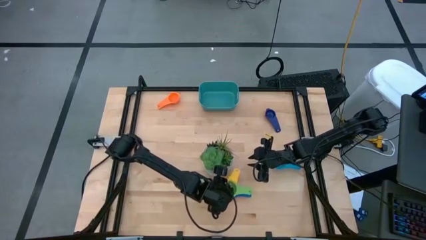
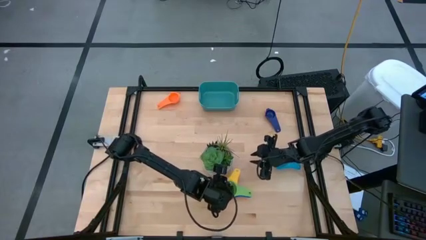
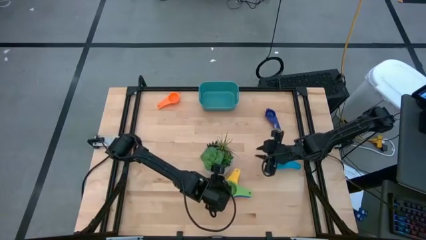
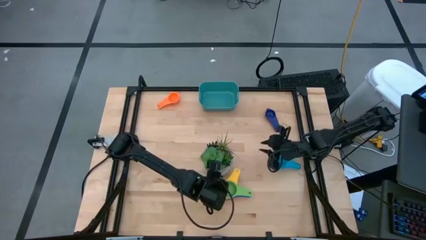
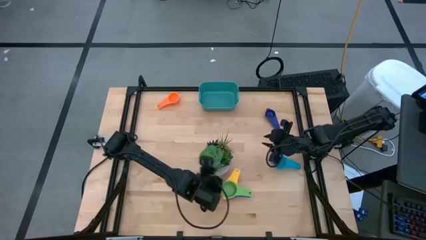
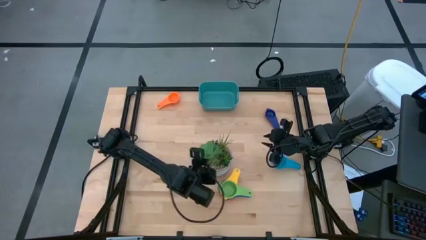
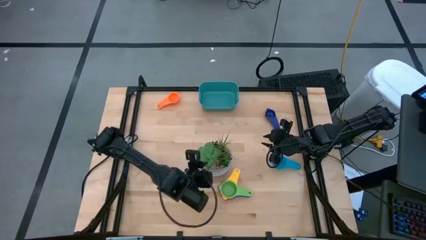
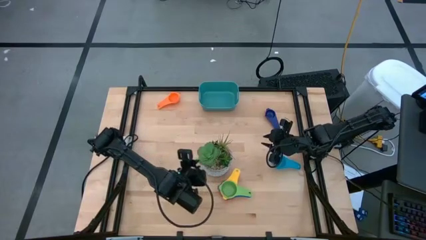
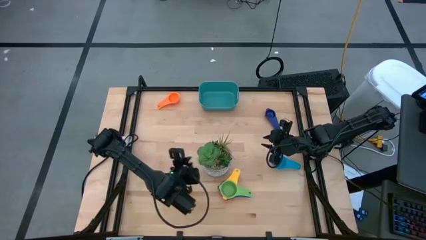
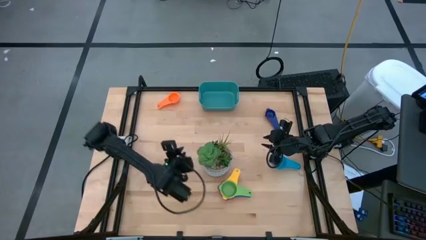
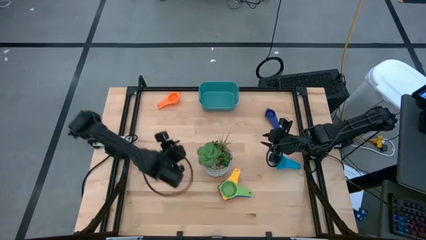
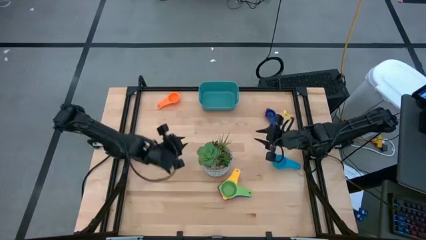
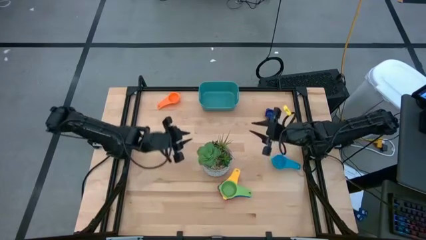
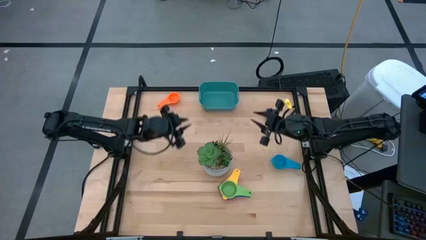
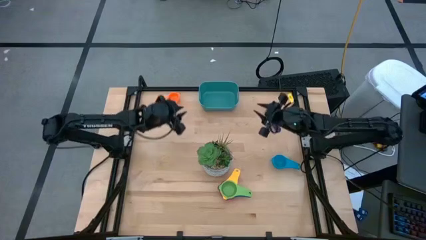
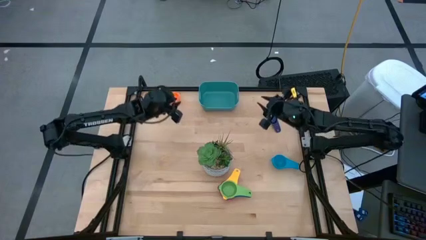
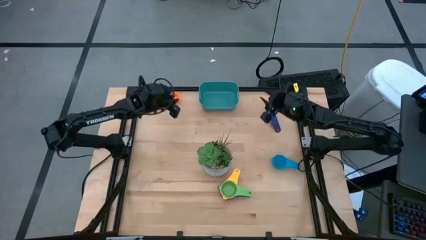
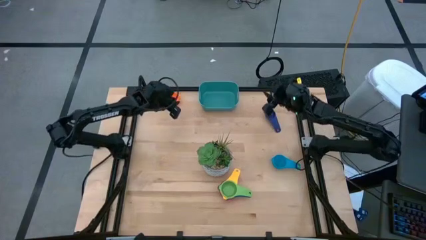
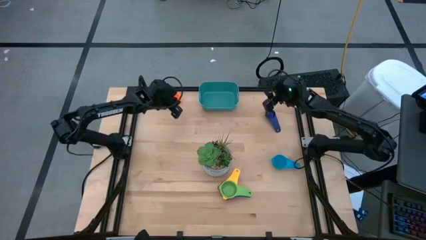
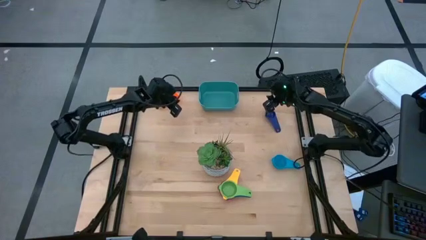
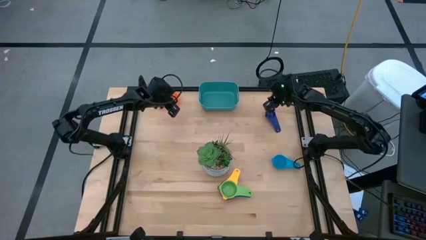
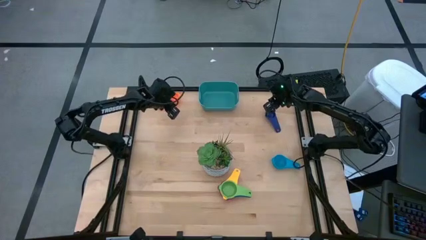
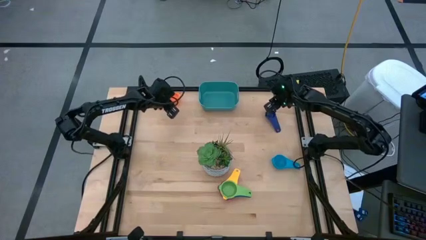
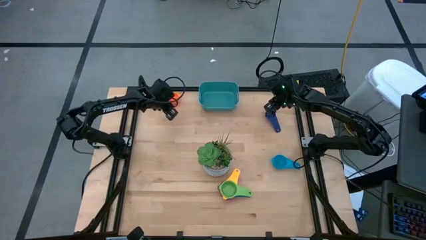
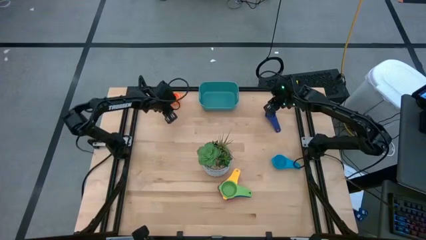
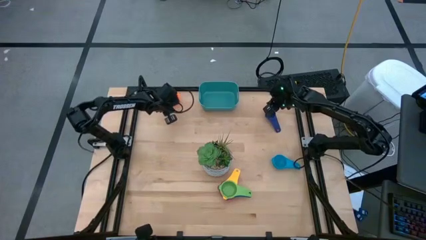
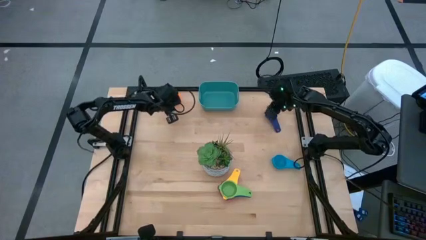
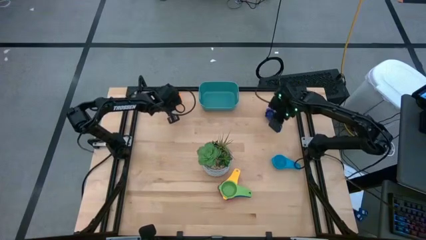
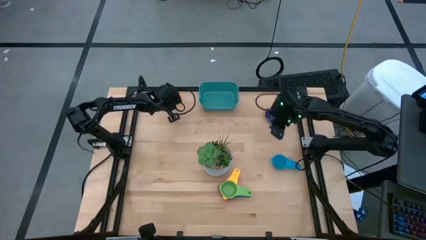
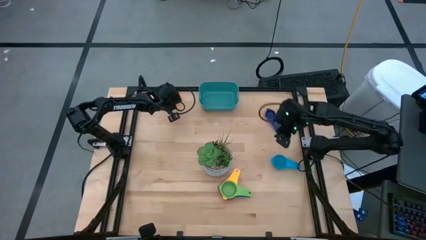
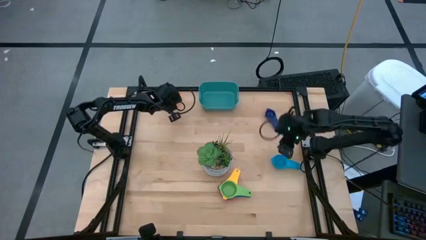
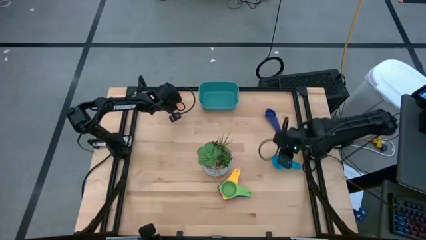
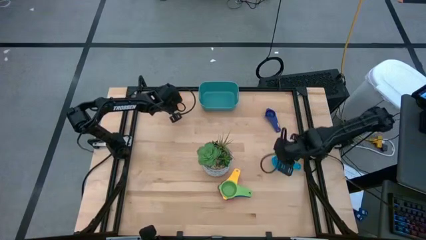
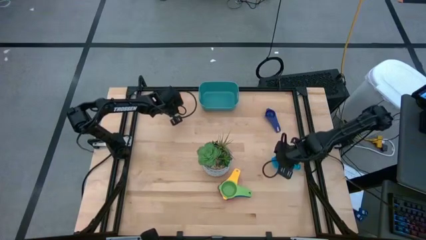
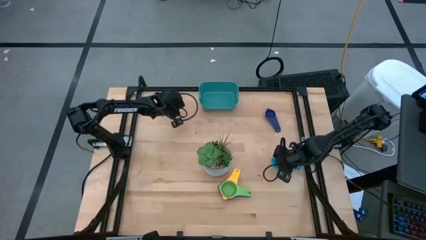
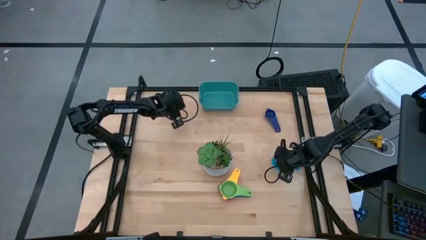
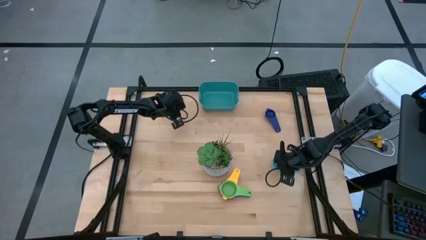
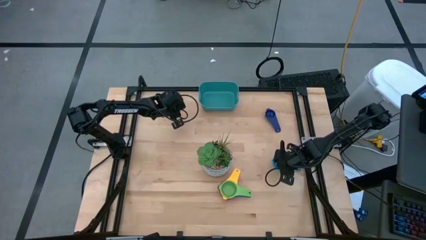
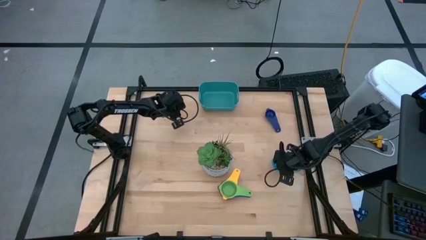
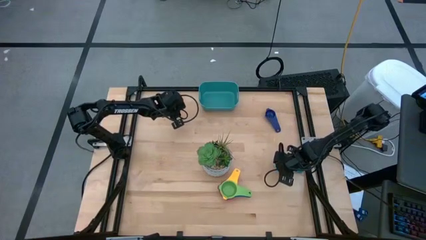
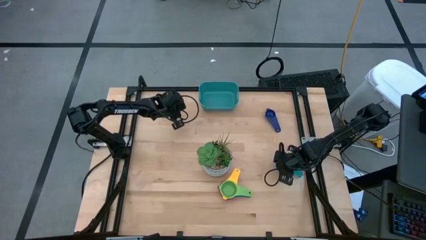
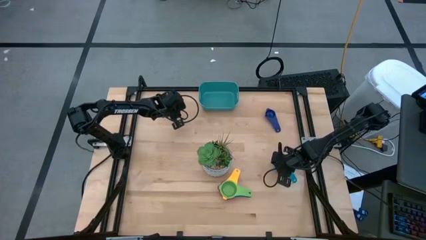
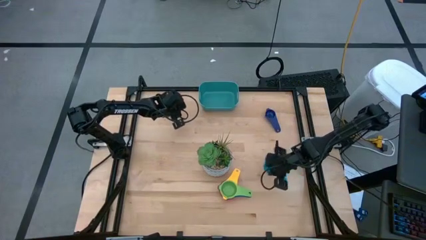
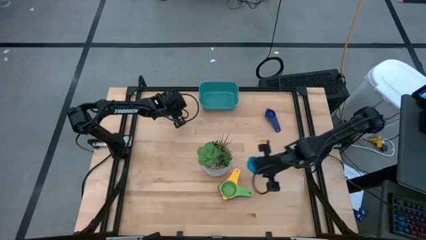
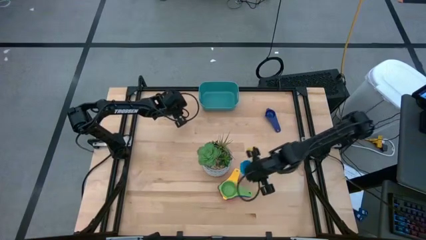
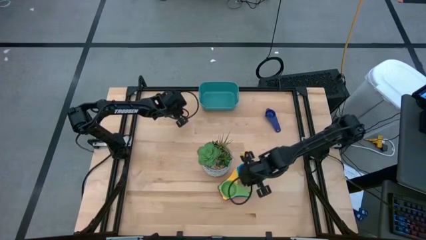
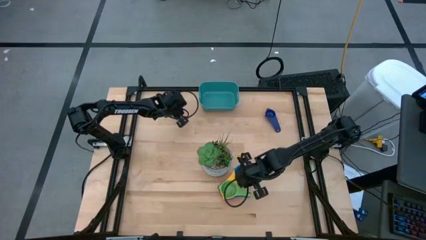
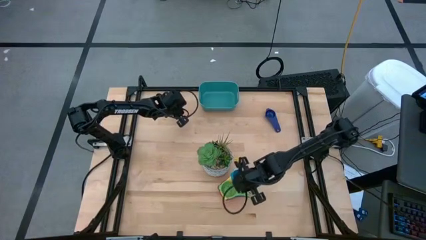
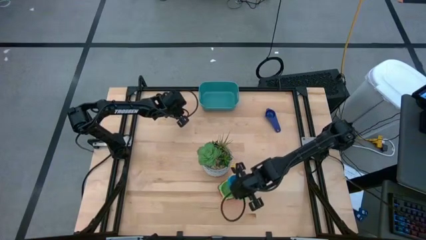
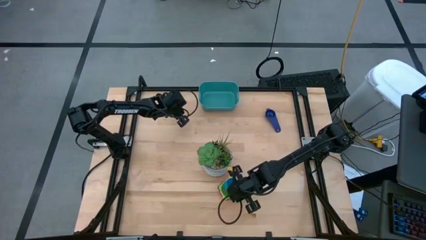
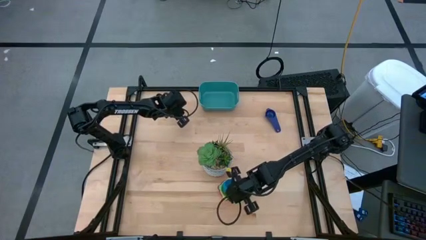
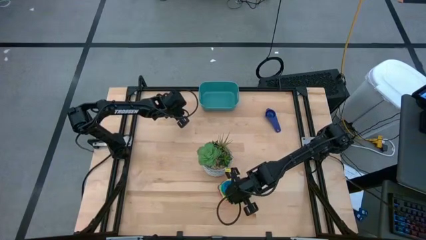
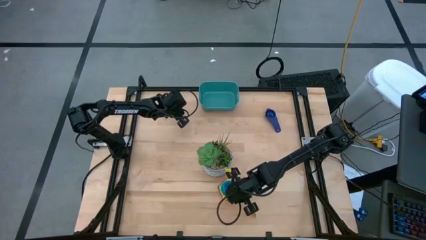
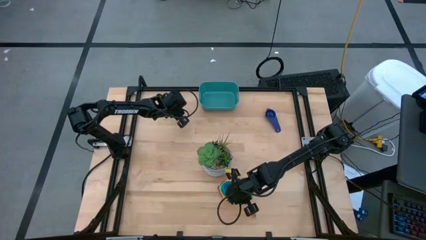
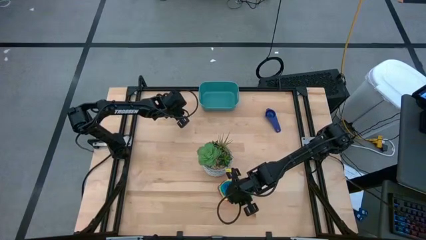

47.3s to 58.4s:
Task: Nest measuring cups in basket
Stack the light blue measuring cup on top of the green measuring cup

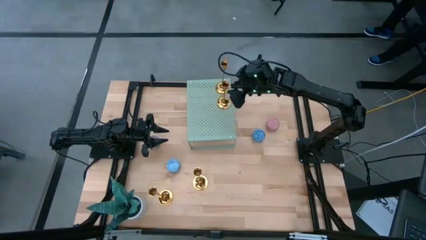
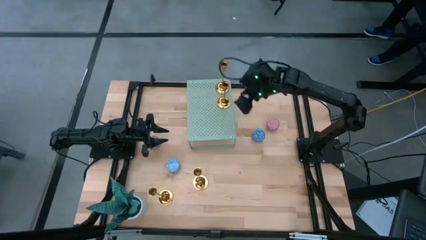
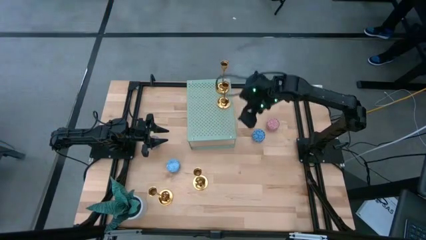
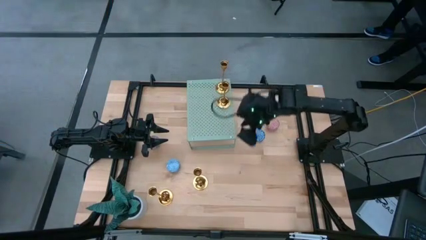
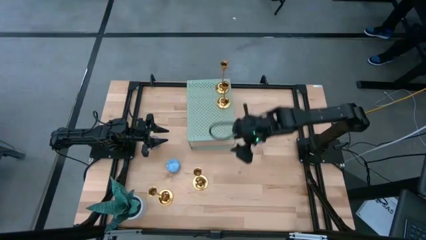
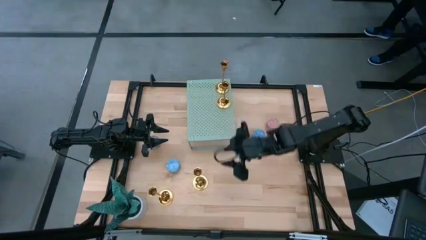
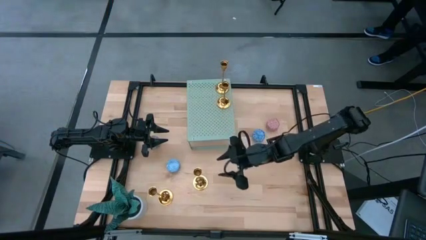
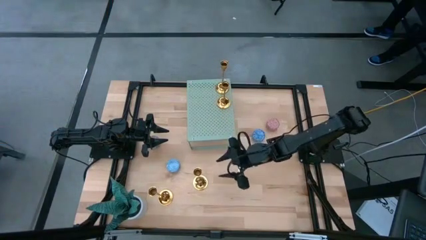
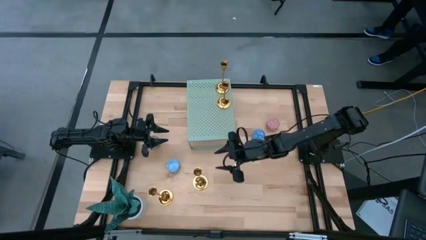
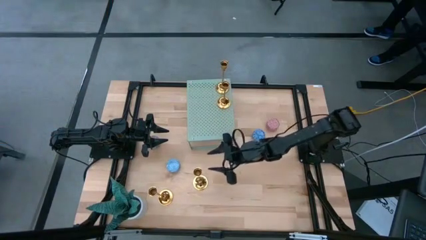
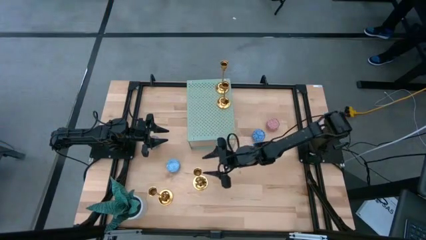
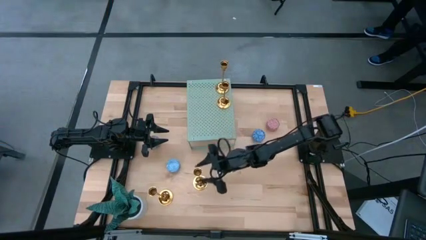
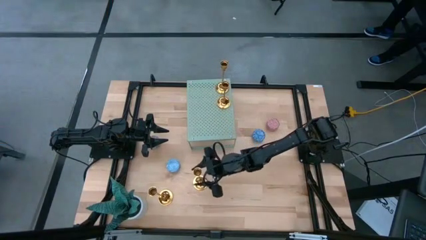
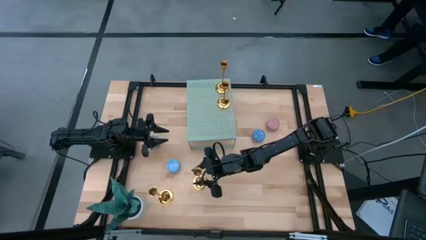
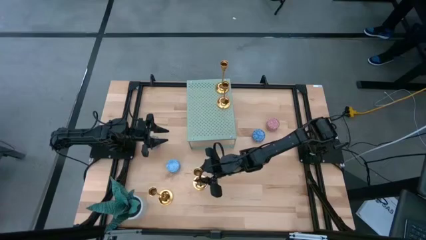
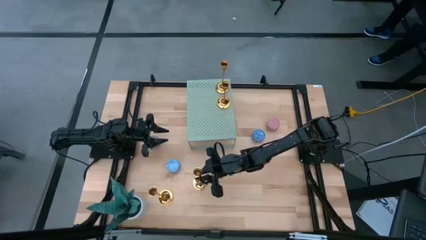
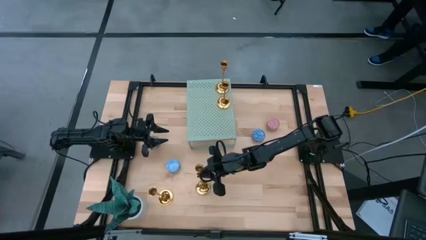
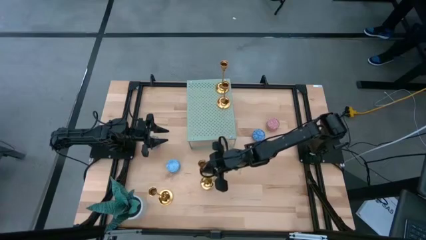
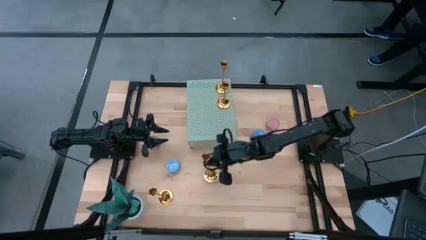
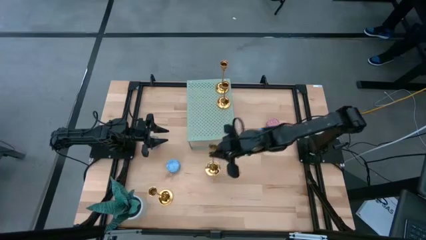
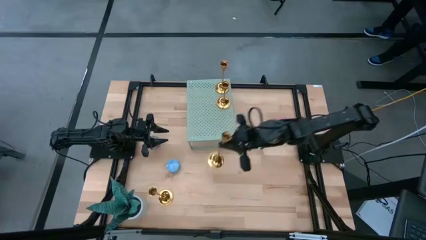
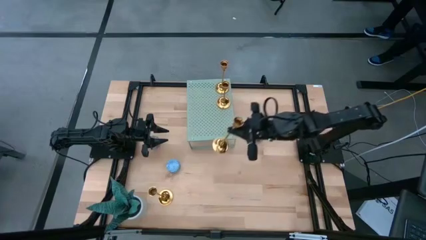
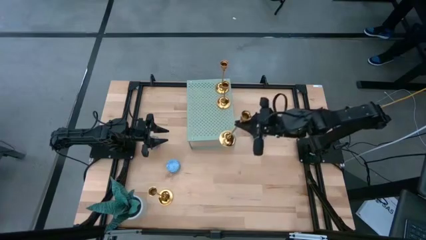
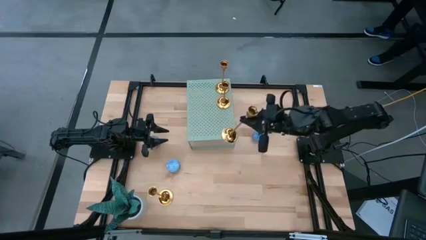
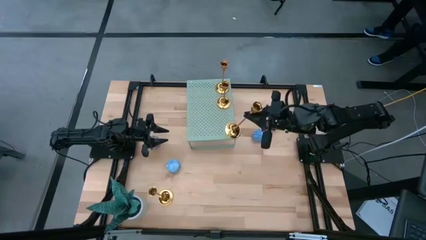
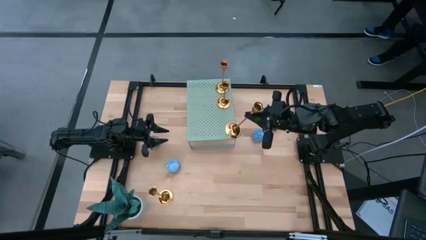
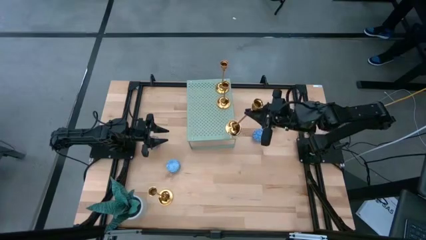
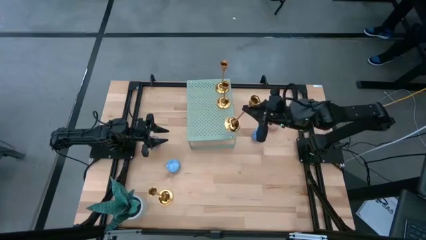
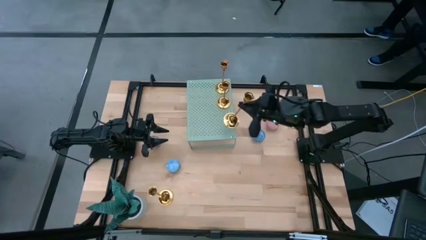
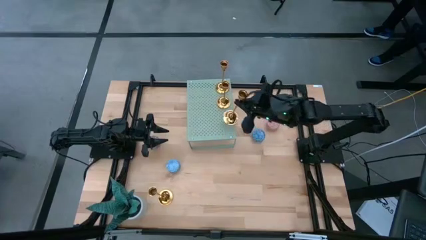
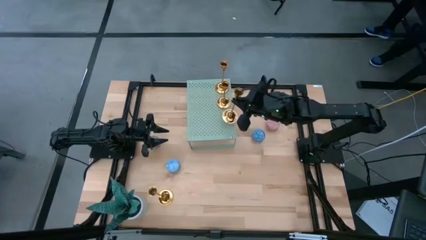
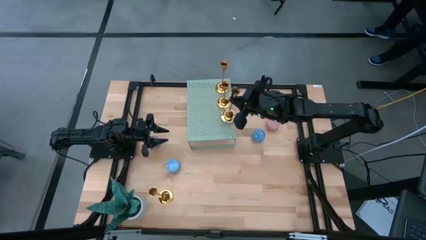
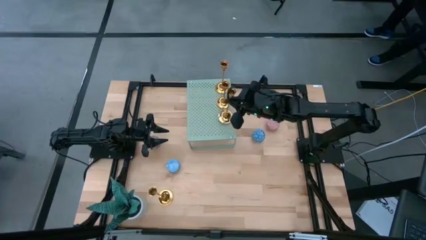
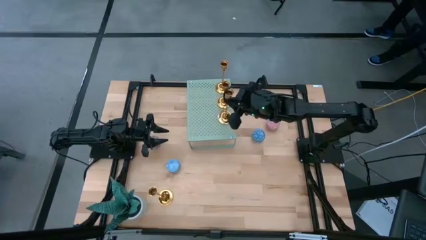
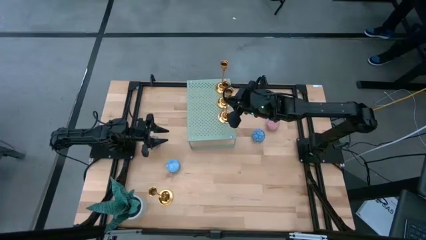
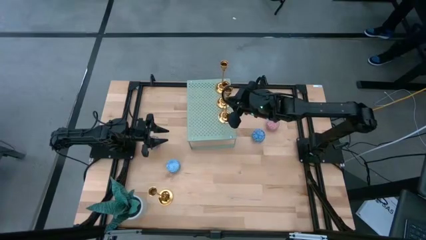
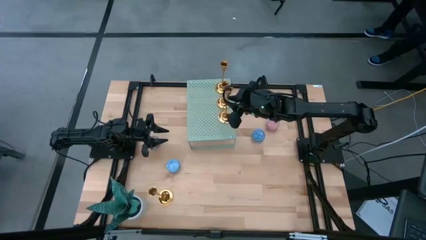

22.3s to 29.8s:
Task: Pick & Place candle stick holders
Align the gold candle holder with the other gold candle holders on the shelf
